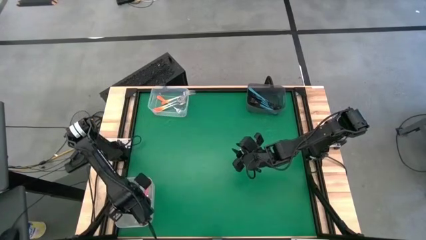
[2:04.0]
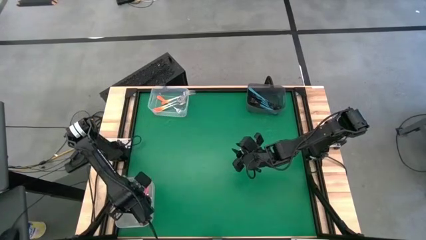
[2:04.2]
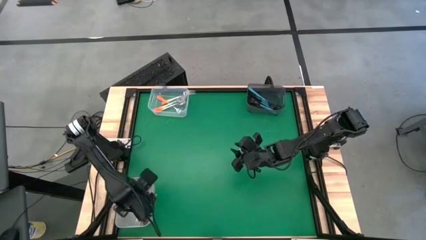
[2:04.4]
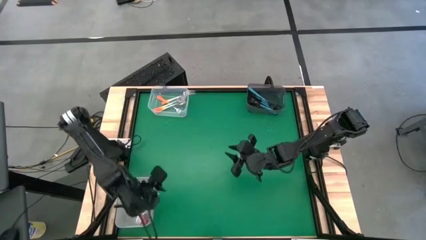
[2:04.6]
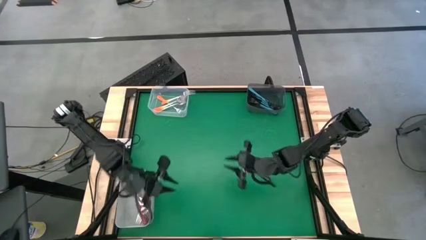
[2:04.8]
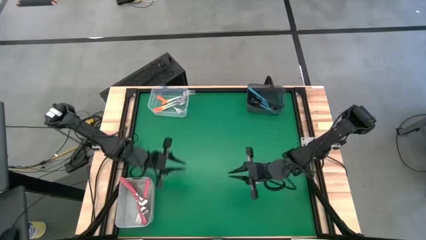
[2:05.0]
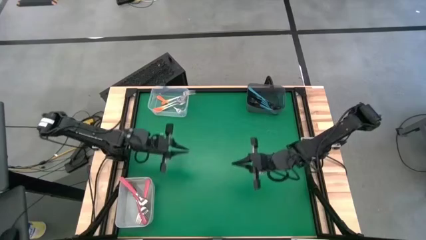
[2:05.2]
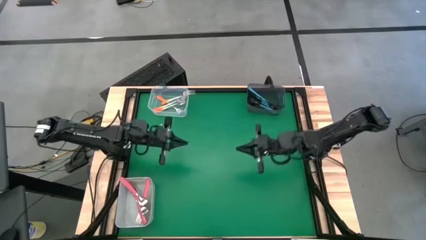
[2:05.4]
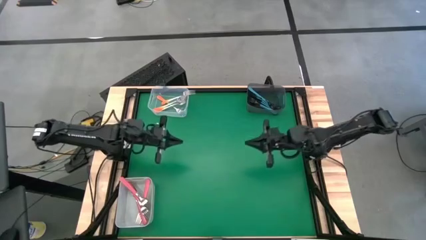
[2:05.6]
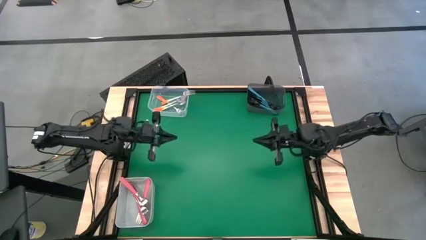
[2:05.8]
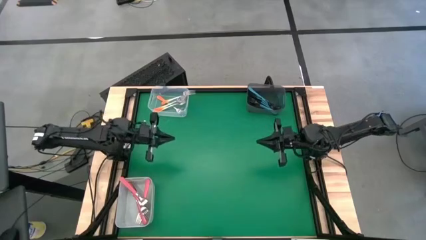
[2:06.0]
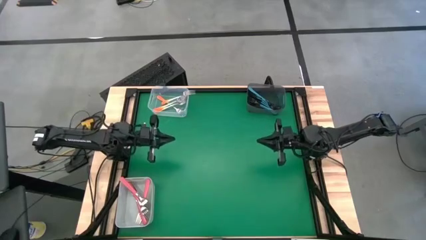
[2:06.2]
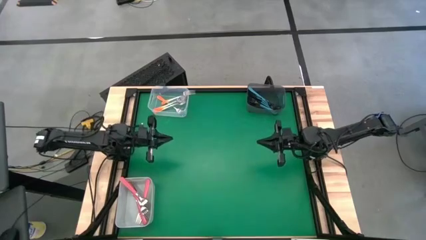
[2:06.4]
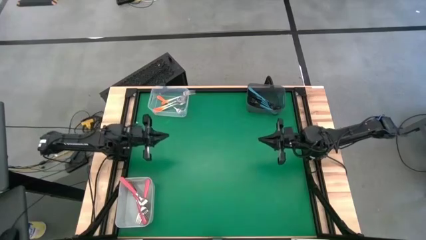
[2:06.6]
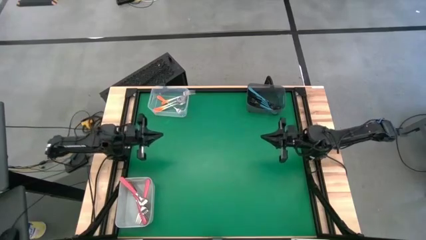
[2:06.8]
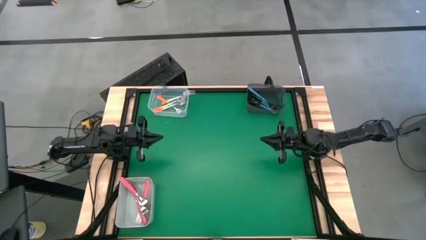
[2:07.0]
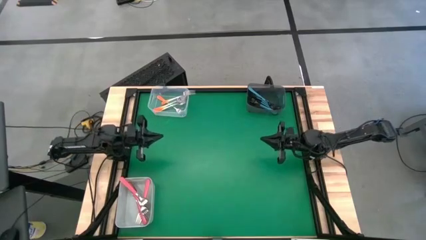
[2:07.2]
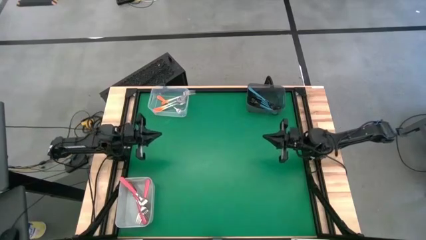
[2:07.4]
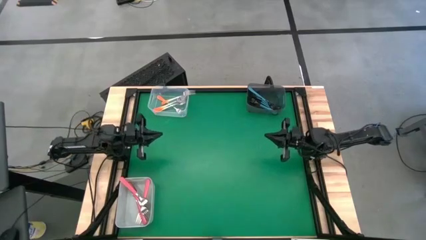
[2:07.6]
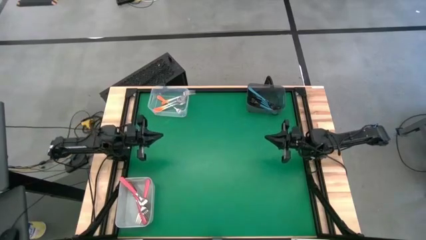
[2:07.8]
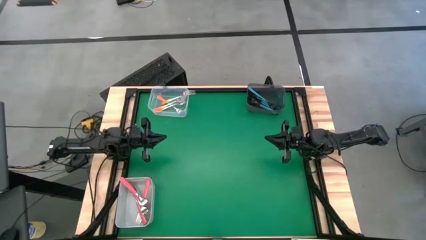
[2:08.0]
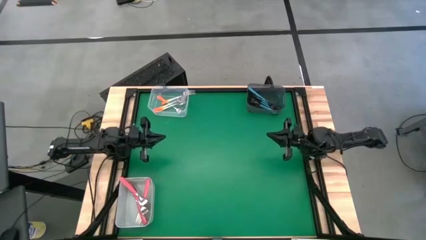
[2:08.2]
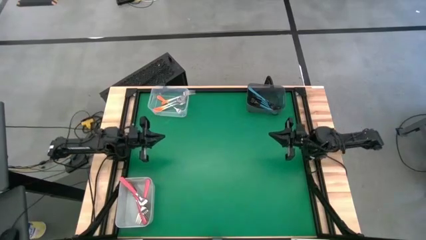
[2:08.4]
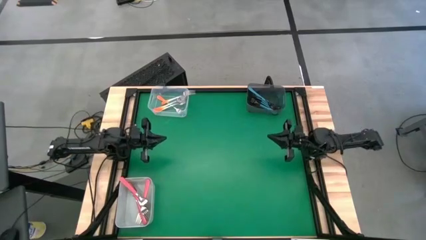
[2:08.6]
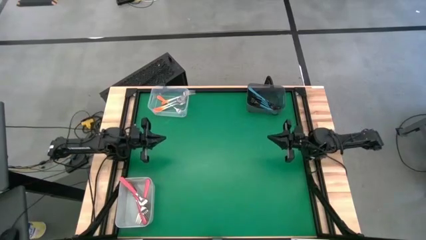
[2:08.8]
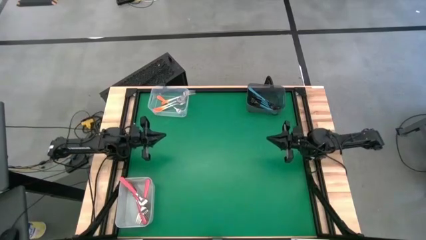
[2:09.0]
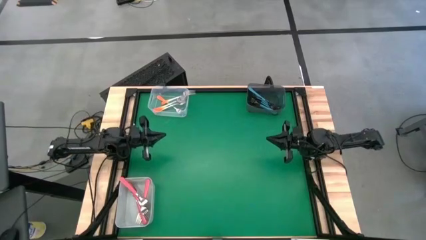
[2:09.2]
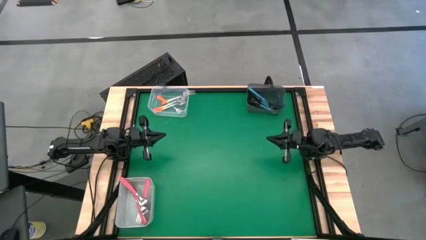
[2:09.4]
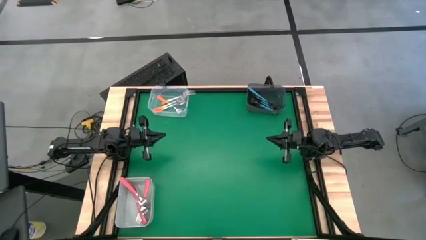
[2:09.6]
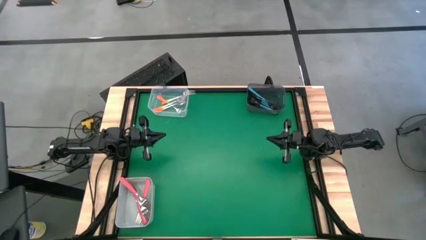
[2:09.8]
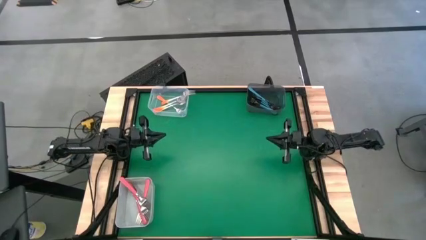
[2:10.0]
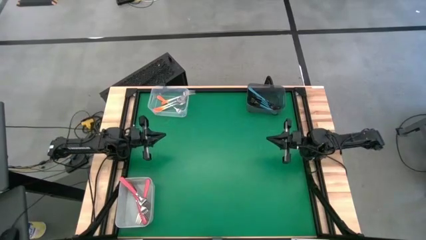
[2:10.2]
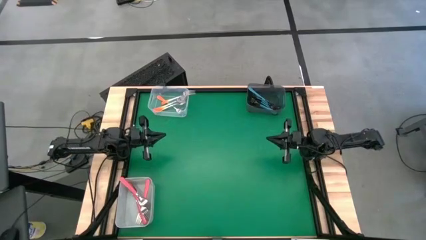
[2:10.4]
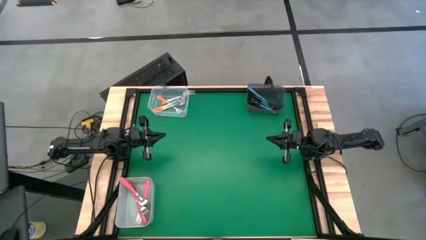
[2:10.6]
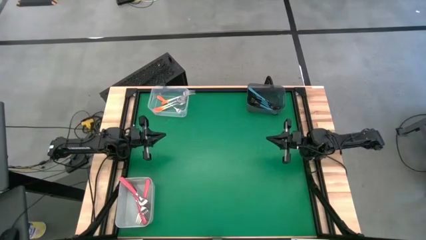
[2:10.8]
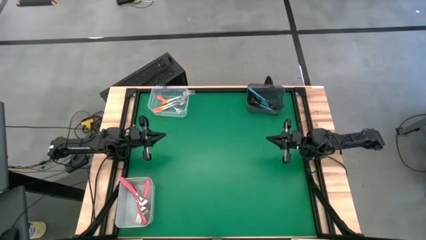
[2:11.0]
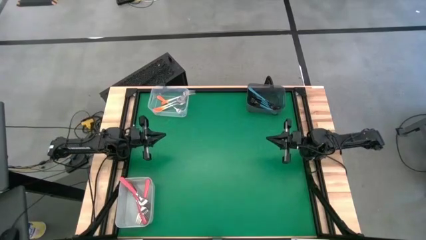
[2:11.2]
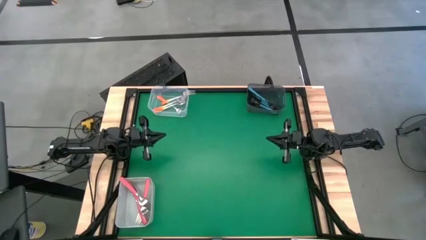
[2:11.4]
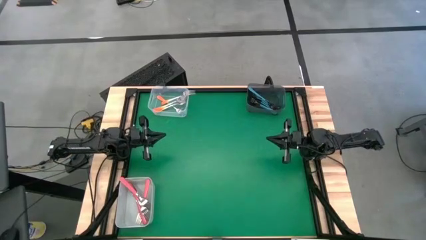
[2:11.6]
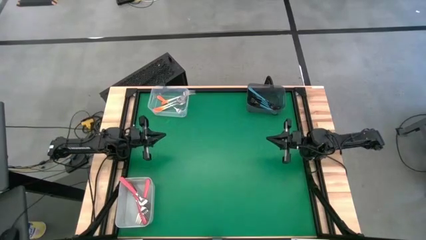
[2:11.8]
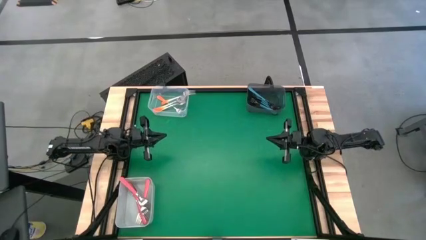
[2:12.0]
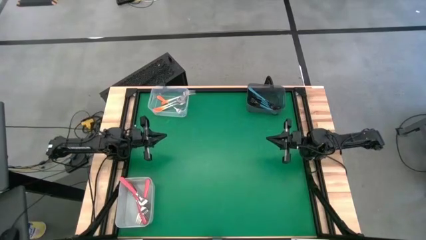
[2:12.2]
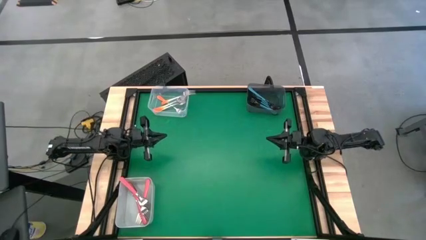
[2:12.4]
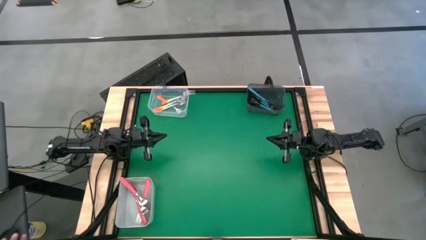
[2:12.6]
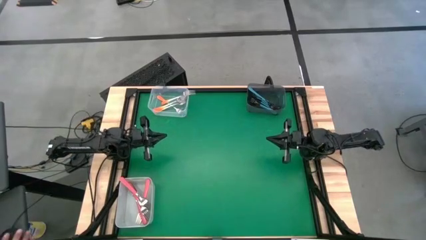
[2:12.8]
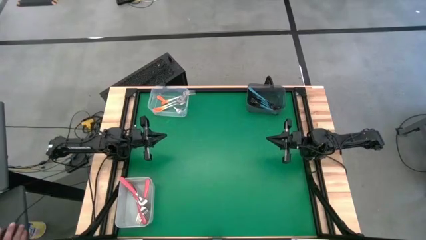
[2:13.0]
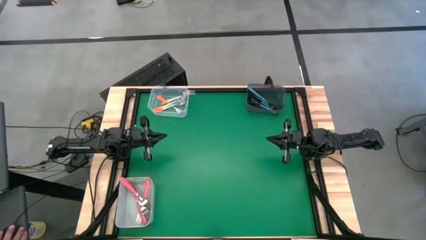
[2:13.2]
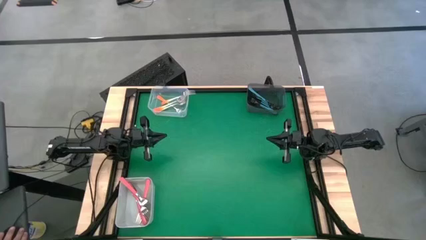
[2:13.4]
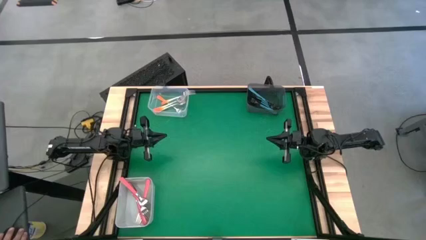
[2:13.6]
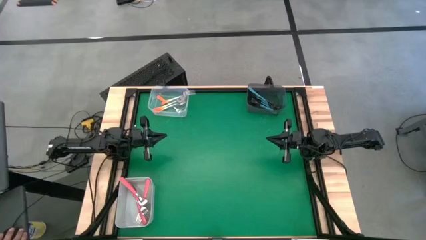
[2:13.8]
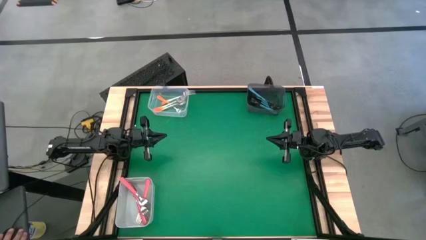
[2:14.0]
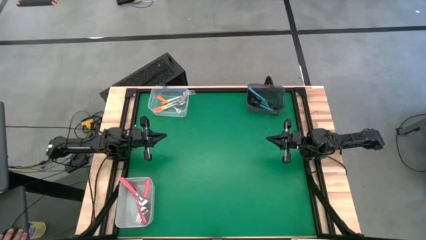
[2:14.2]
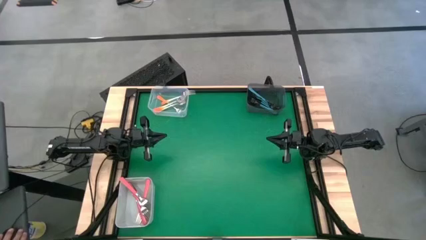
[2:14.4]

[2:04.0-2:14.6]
Task: Sort silverware by color (type)
Return to Home Position

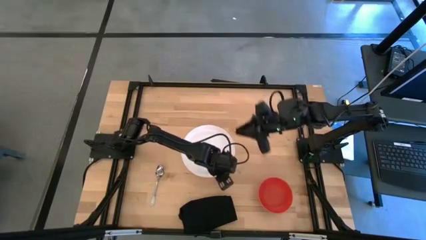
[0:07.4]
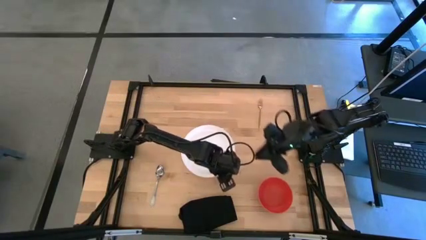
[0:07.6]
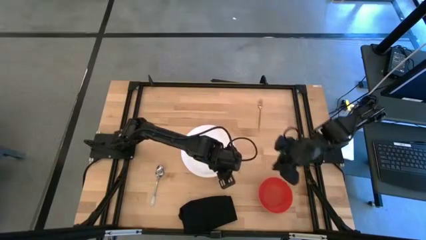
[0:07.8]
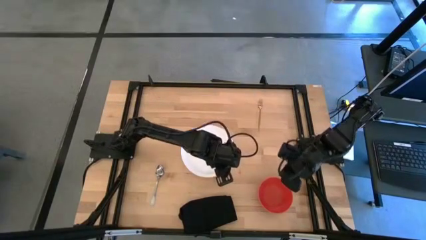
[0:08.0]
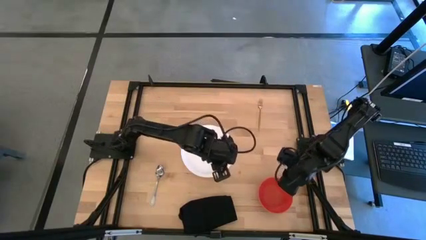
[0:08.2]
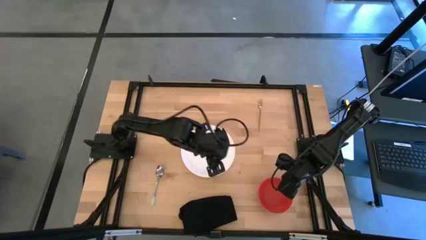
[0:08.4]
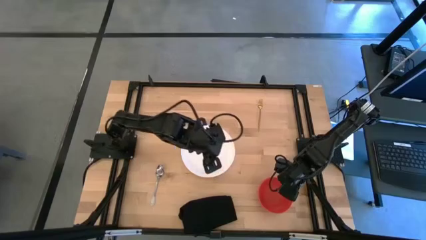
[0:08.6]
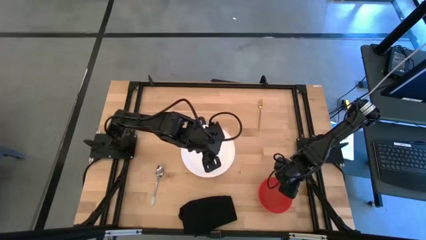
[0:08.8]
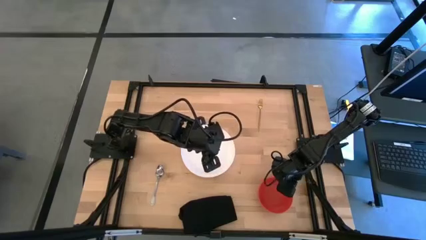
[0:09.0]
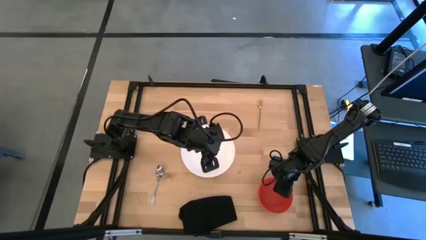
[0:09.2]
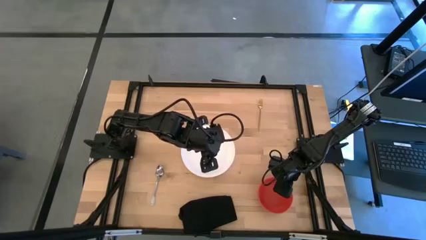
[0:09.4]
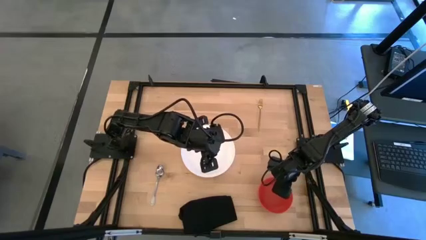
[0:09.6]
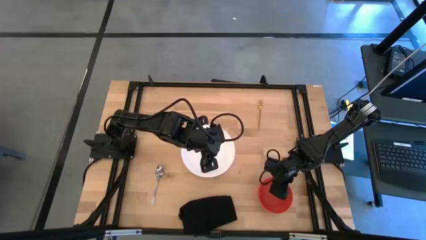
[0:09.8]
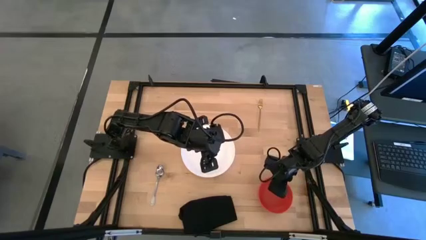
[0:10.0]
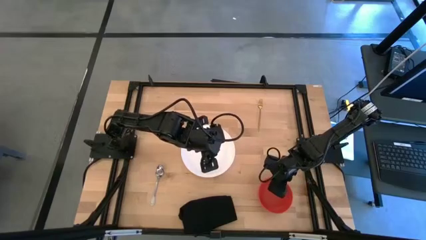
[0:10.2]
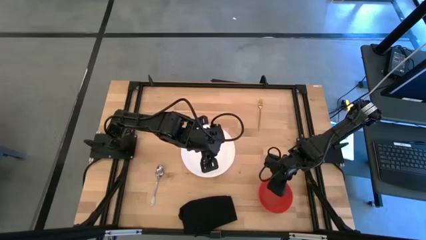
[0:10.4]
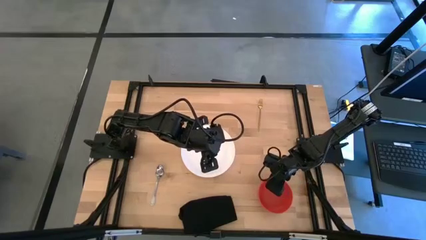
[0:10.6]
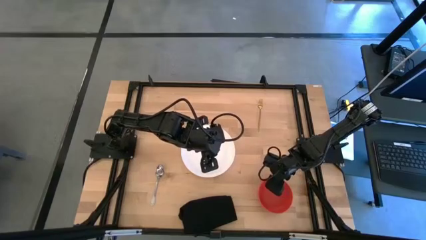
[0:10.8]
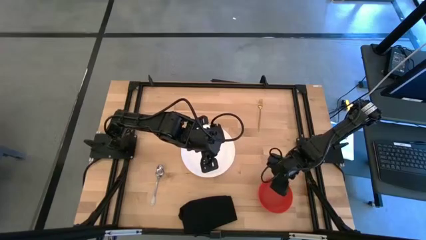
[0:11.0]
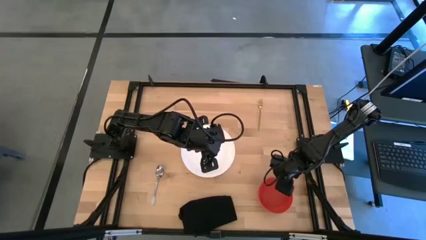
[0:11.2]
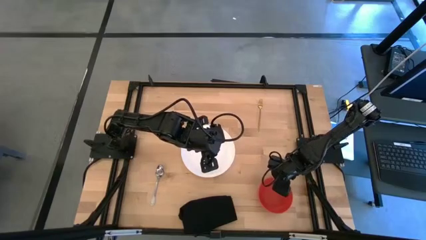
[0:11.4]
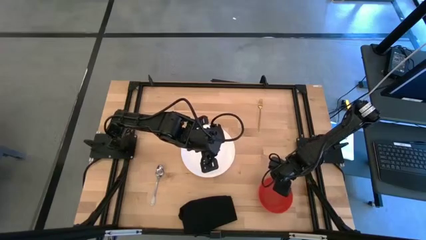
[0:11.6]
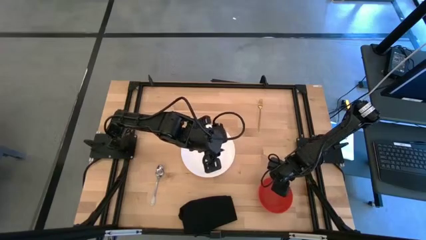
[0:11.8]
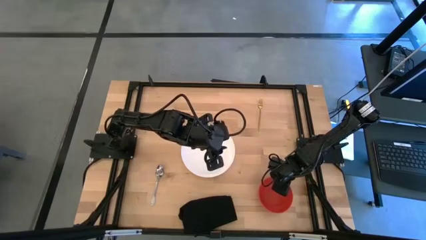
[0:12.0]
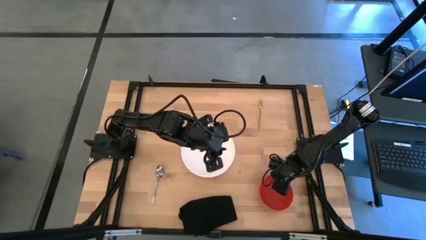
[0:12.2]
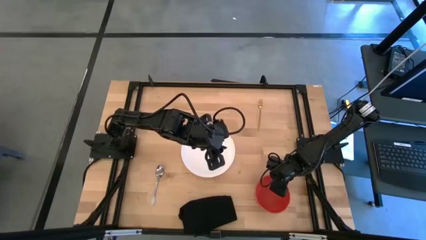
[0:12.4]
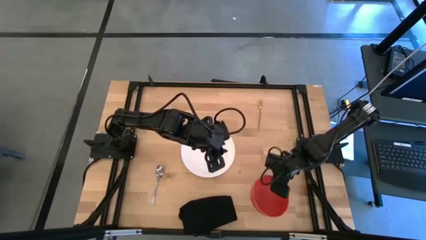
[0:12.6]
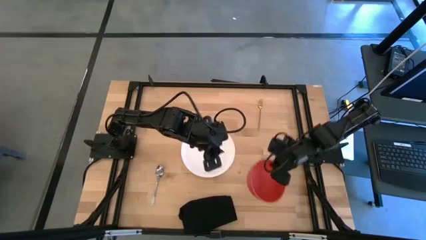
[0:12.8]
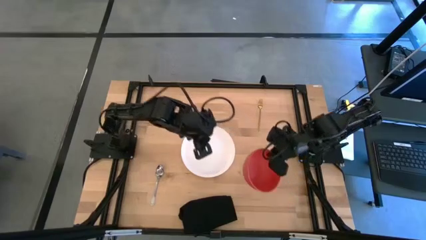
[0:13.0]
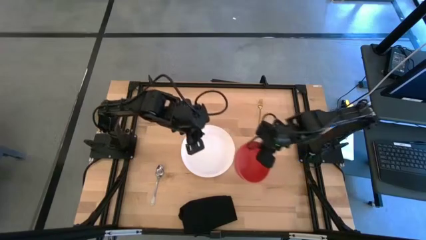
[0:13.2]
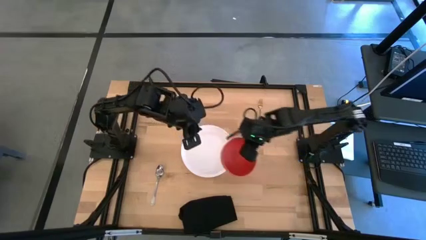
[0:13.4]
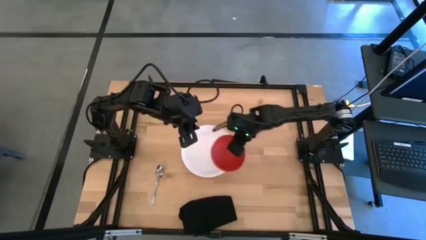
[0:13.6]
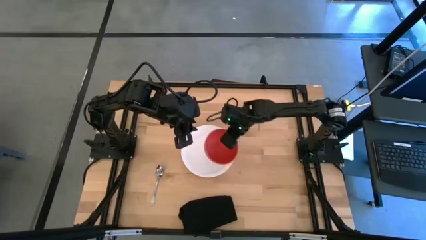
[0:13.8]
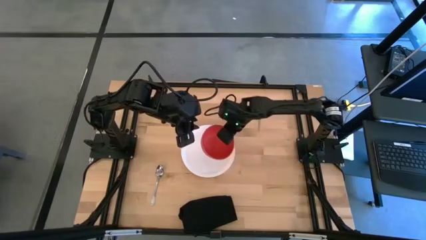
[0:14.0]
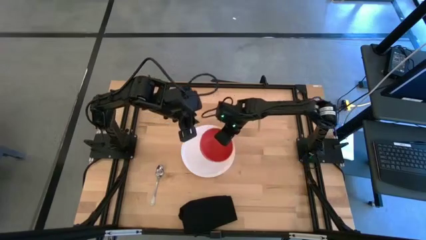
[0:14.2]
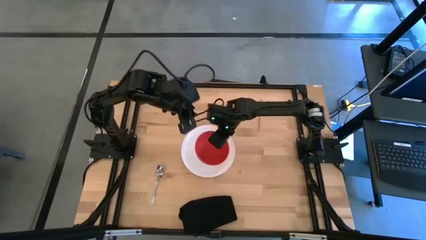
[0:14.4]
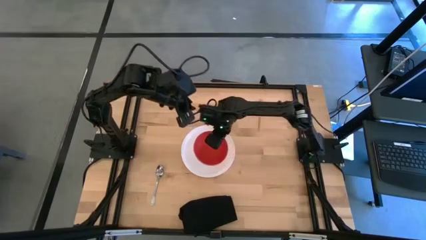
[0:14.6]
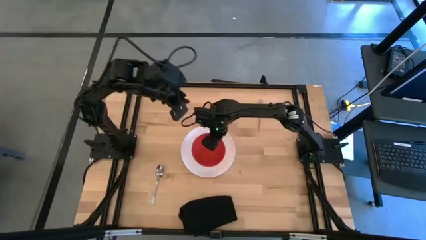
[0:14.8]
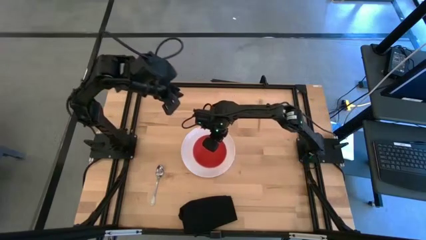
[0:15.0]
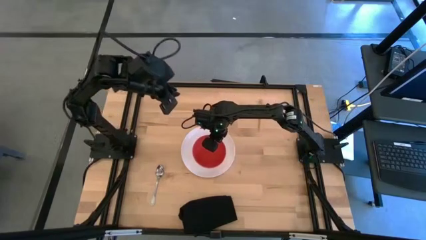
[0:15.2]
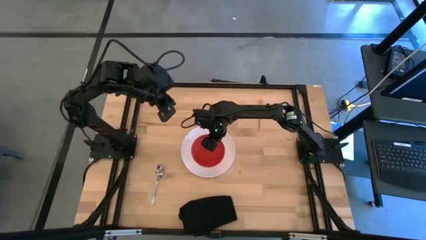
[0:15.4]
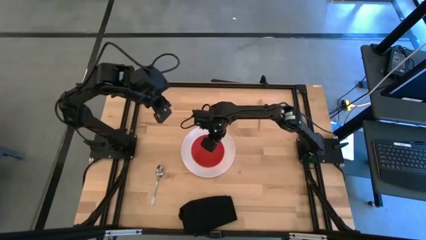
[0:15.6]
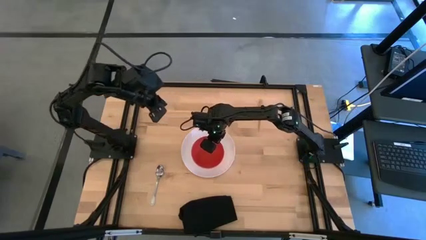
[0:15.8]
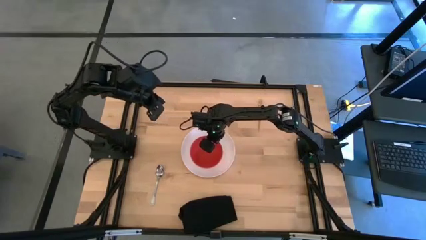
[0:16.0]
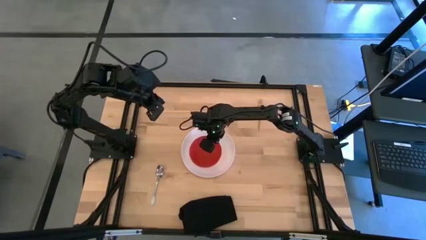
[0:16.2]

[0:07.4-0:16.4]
Task: Set table place
Put the red bowl on the white plate
